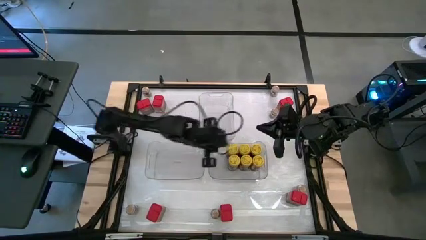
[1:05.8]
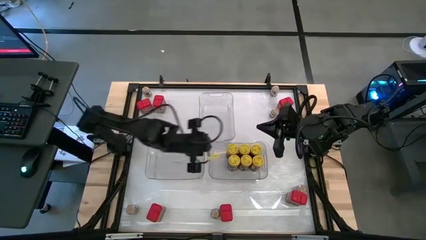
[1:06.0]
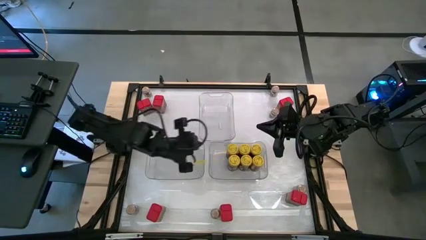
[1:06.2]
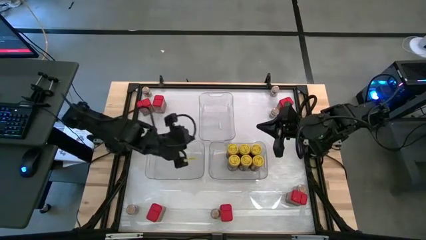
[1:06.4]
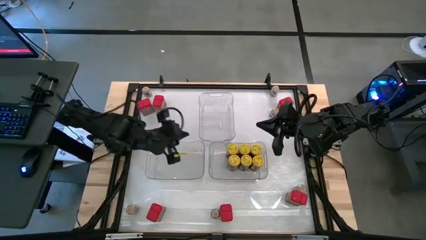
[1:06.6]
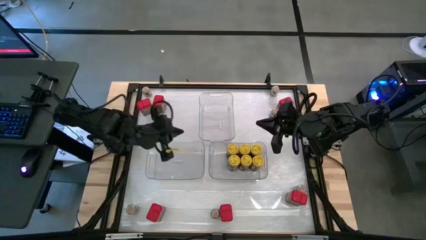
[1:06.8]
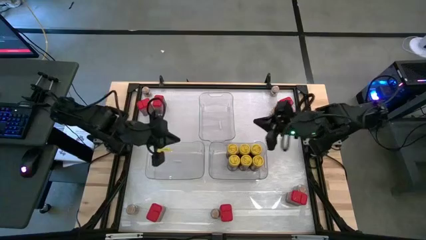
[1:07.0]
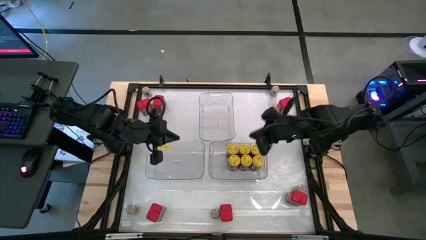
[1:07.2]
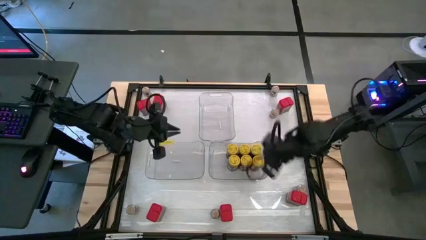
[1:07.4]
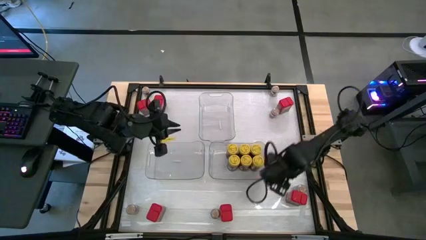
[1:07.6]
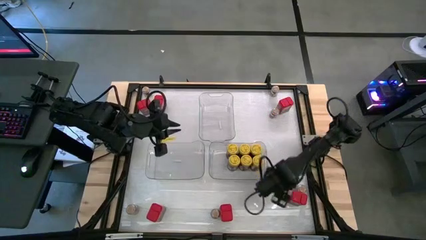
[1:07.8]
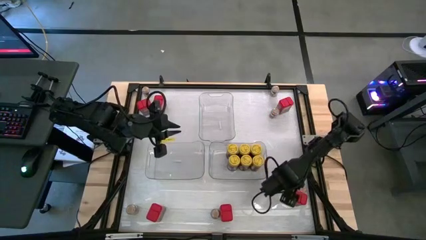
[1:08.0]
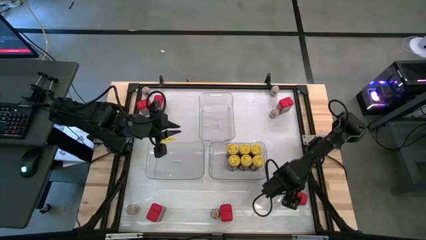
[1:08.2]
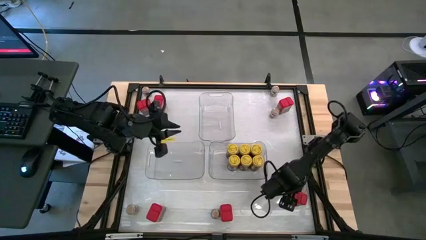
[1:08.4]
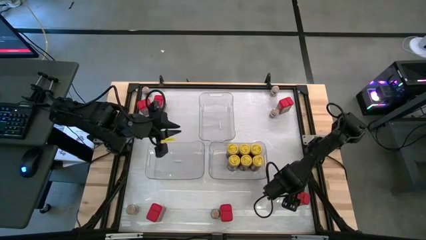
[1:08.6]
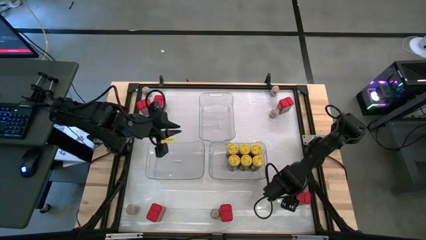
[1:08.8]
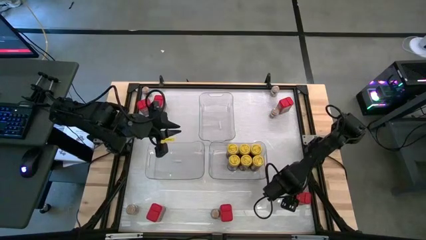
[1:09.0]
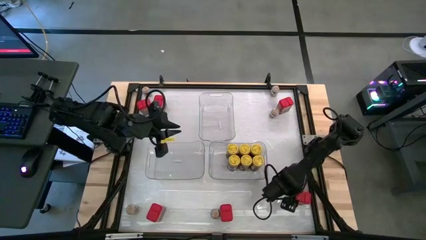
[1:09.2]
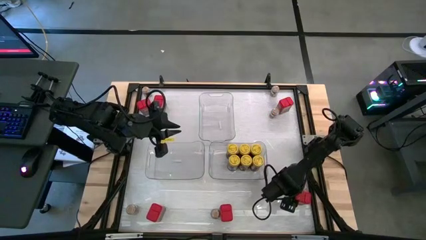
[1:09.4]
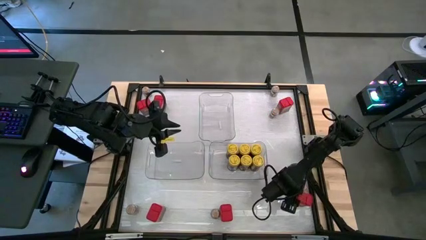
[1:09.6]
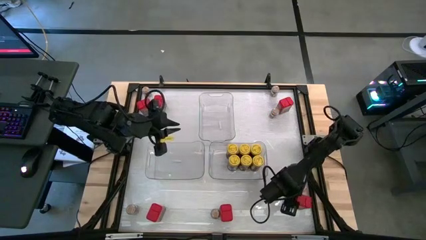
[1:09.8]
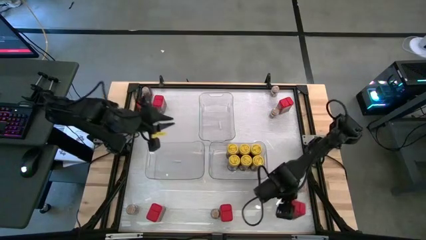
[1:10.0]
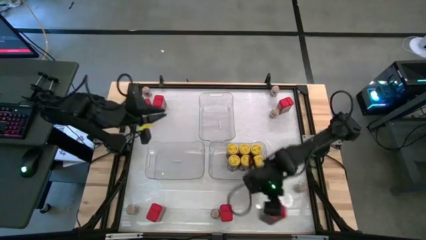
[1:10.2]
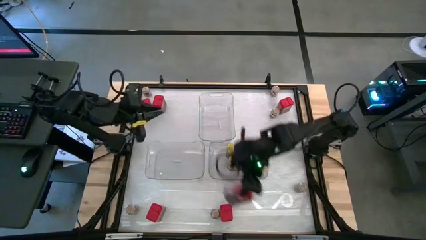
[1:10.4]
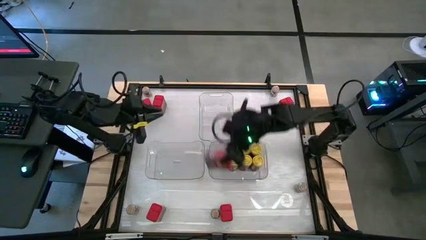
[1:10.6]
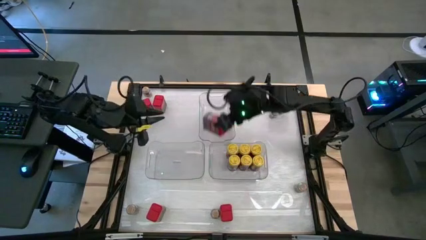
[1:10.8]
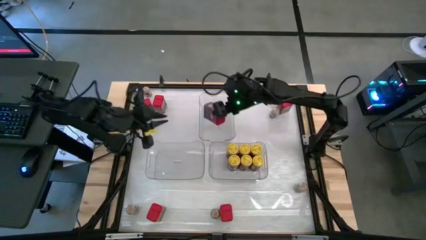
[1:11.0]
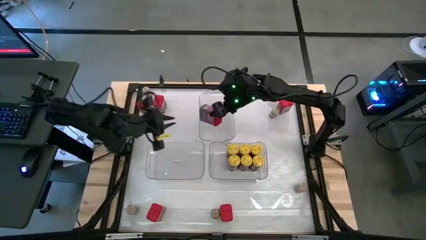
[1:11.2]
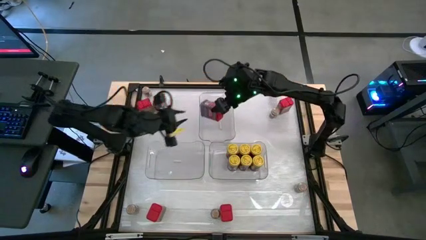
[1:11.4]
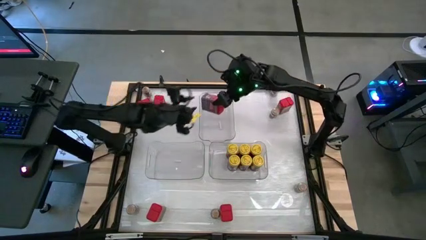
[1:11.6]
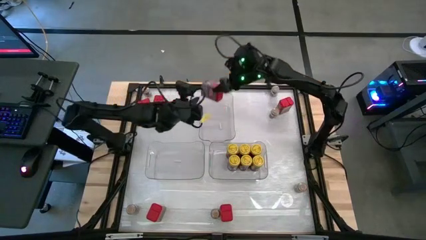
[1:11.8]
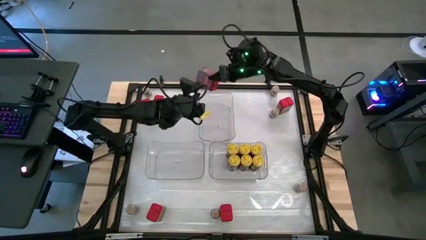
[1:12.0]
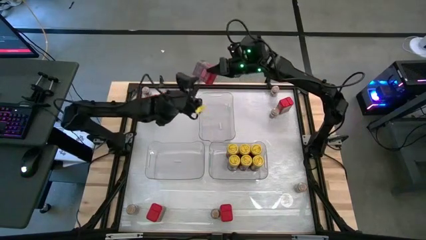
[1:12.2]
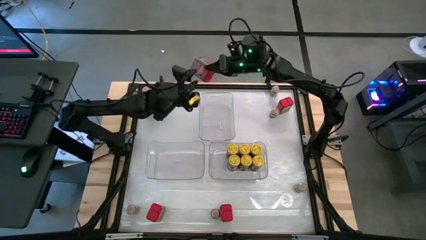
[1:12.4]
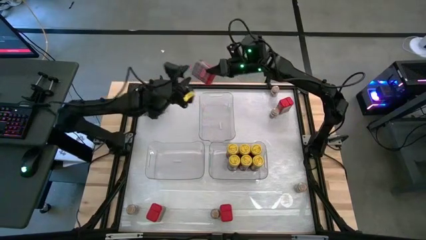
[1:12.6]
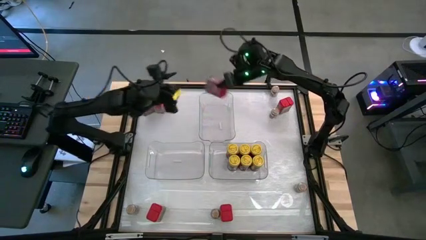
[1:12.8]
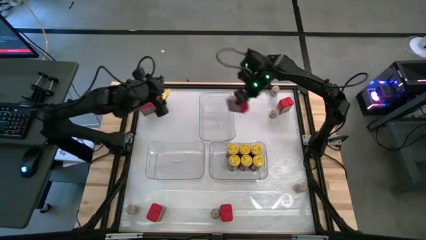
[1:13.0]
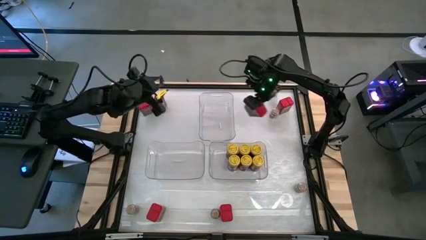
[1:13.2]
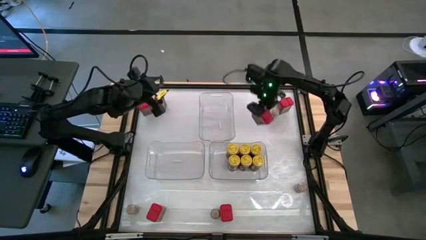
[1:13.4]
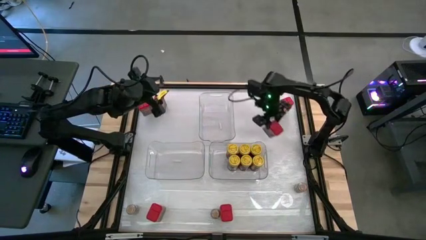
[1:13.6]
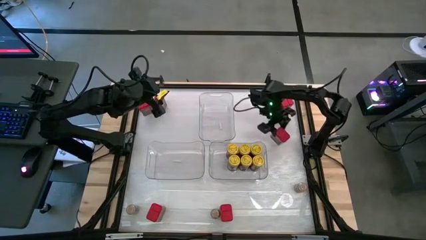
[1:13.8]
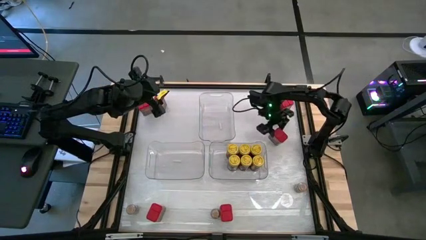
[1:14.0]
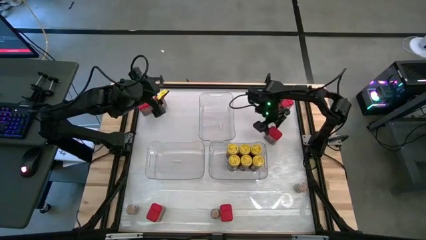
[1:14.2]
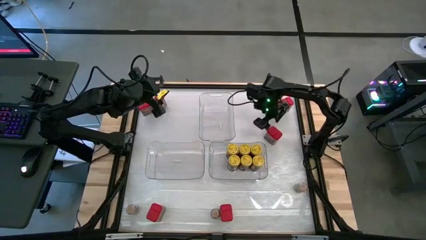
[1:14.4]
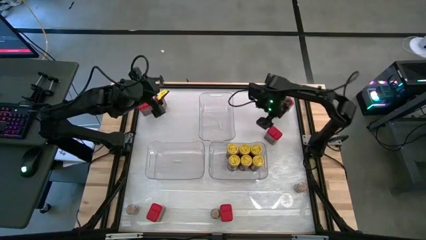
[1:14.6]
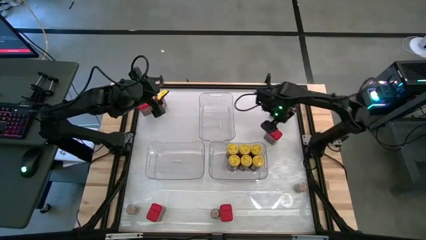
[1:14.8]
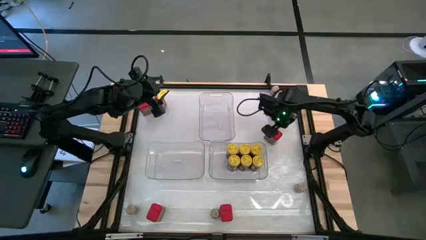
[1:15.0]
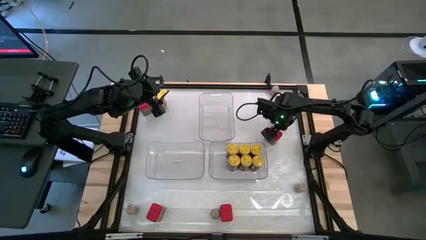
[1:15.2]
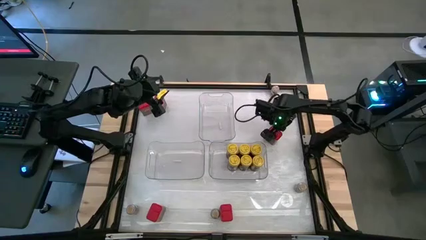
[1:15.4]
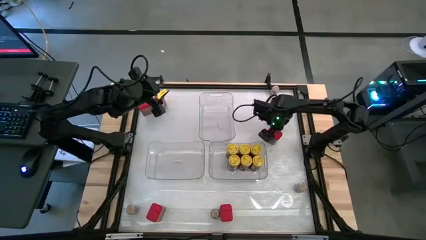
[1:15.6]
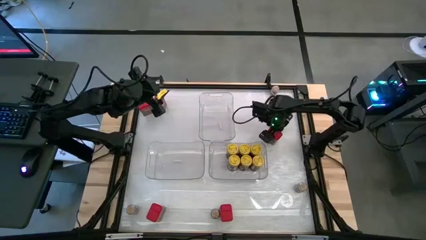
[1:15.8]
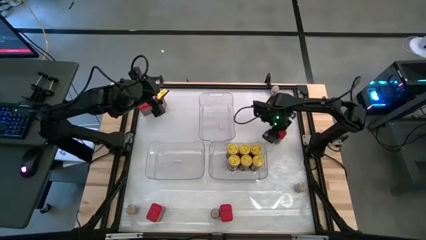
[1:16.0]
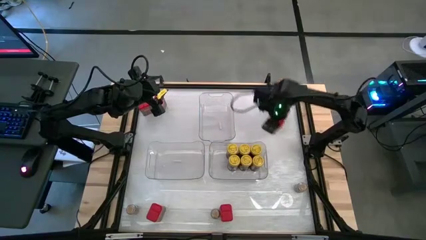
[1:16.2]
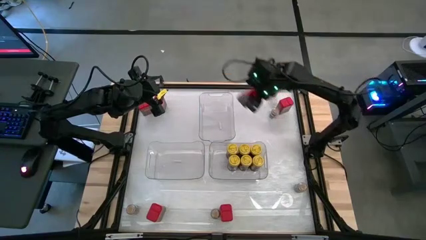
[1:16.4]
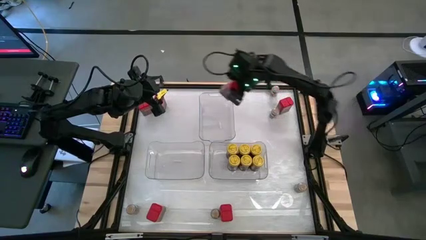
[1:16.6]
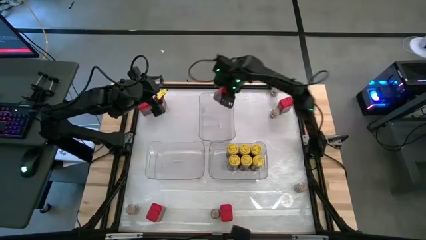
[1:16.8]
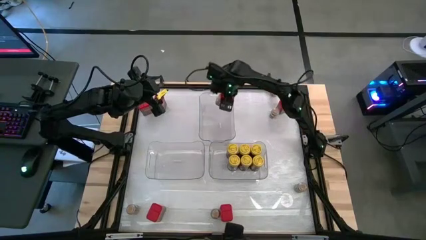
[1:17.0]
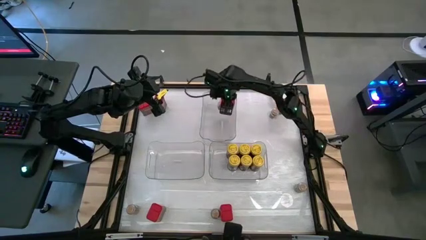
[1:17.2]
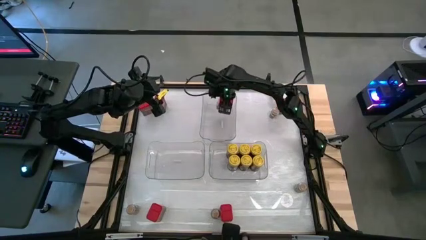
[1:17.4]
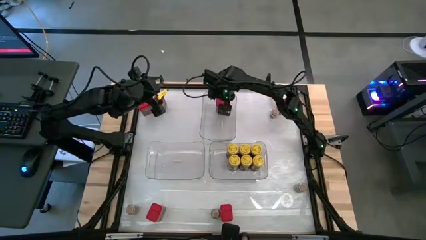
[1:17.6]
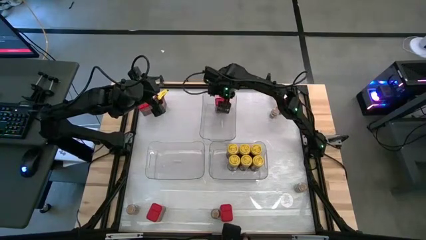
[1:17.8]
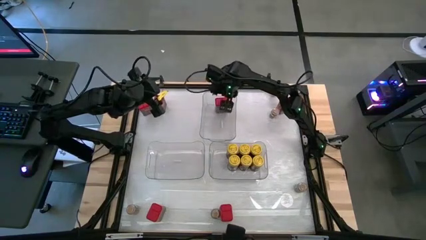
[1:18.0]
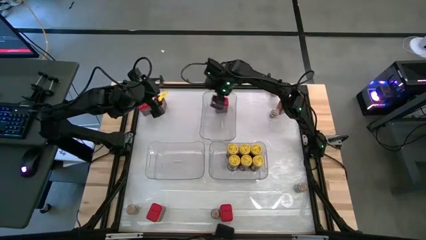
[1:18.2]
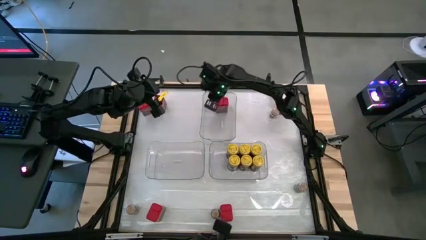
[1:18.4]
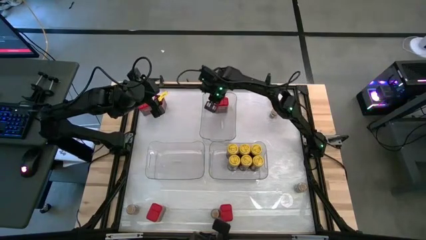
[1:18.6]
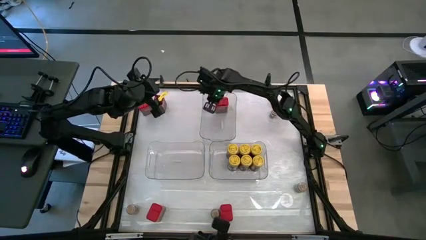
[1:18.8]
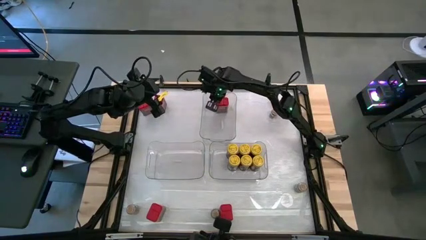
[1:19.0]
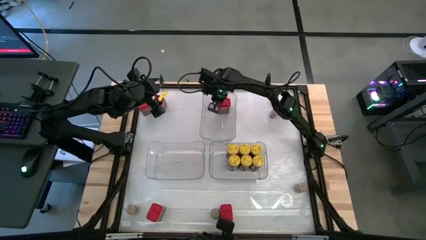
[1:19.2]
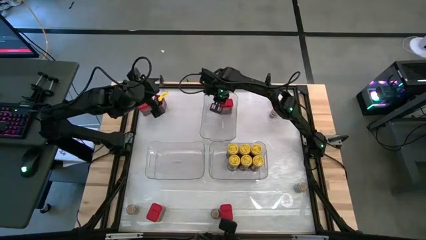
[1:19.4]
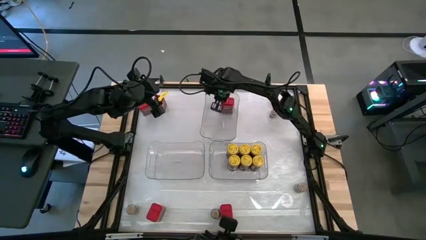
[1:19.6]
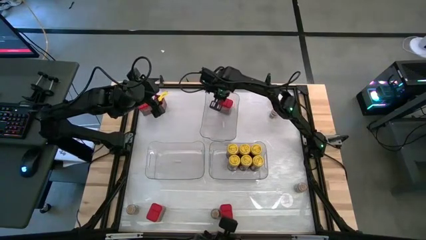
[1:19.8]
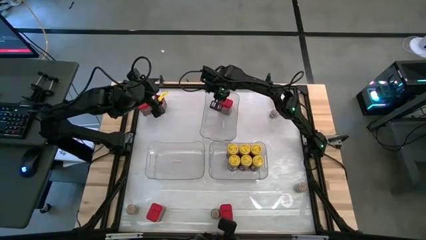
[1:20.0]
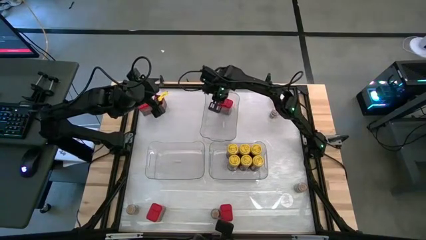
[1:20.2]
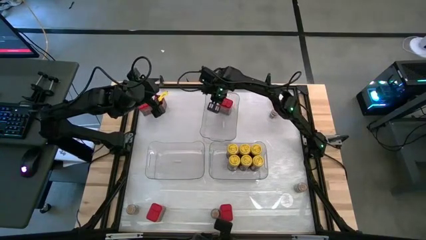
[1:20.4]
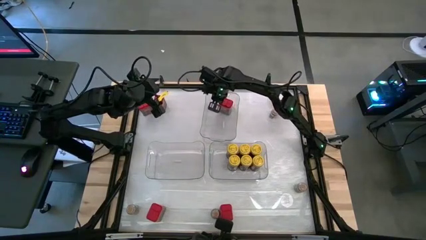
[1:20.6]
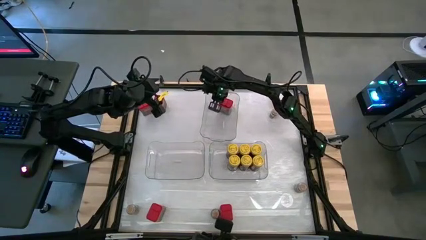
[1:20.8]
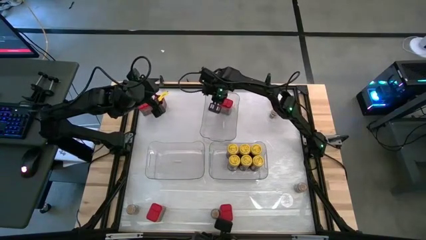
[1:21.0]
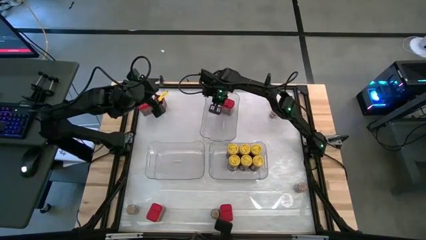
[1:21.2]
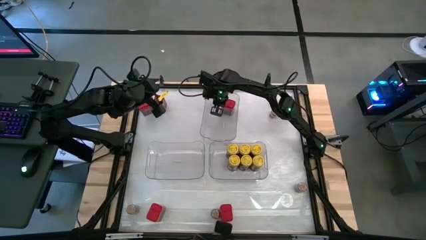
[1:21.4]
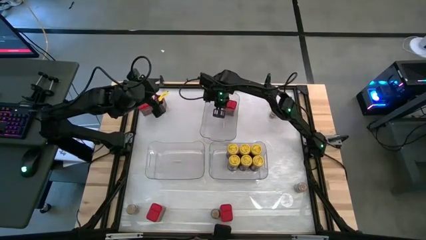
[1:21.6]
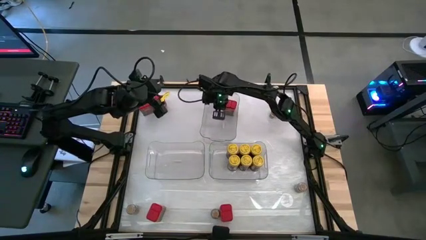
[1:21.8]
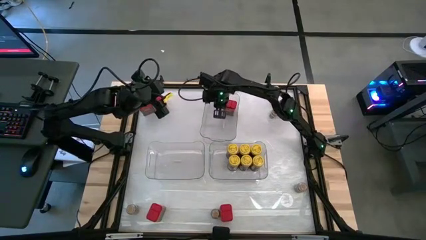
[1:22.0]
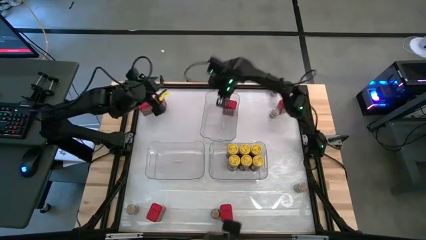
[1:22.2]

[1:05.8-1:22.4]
Task: Sort spices by type
Put the red seasoning can into the top transparent bin
